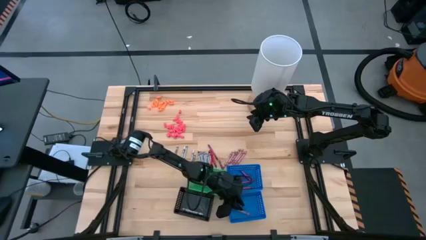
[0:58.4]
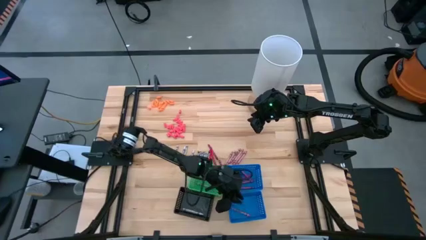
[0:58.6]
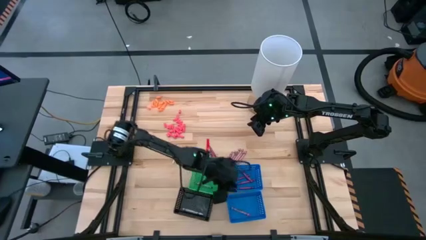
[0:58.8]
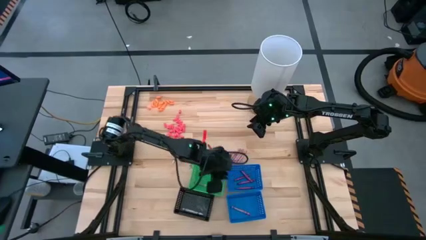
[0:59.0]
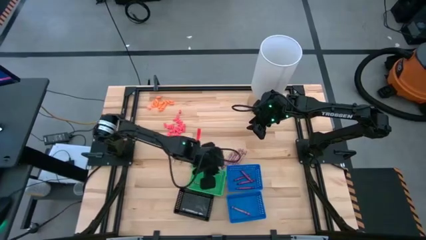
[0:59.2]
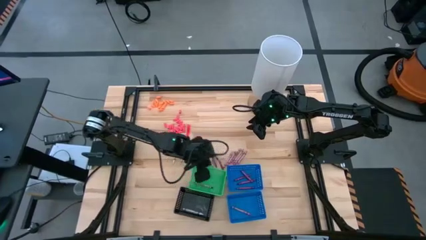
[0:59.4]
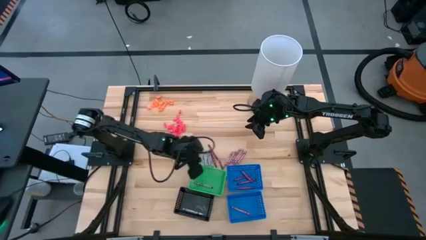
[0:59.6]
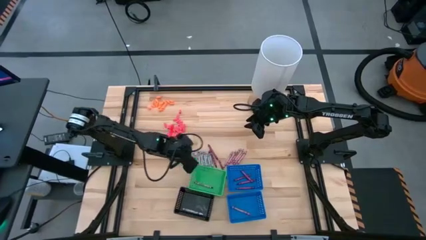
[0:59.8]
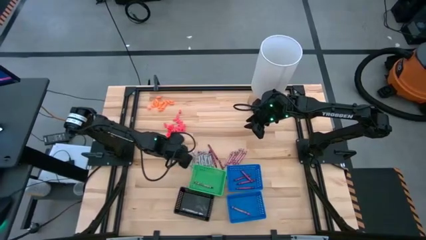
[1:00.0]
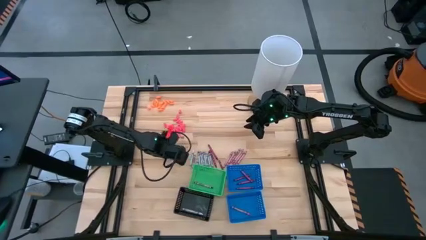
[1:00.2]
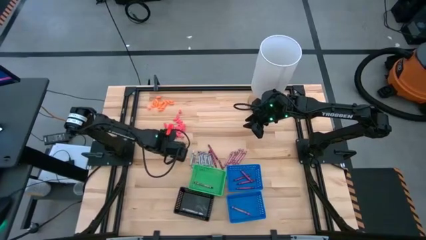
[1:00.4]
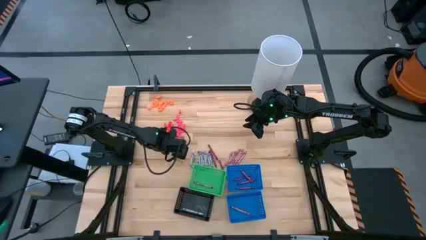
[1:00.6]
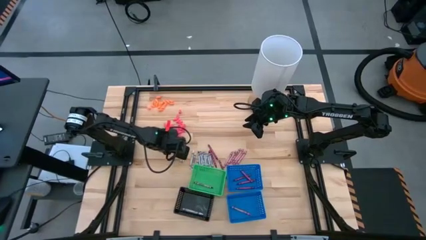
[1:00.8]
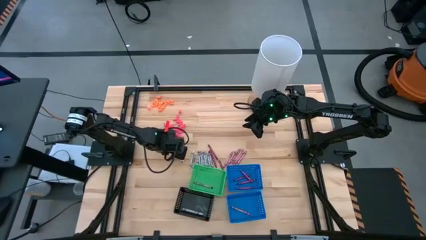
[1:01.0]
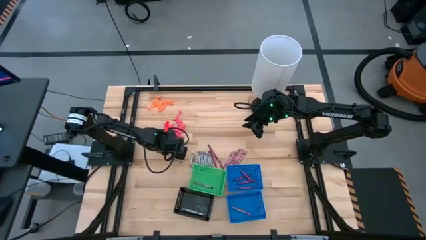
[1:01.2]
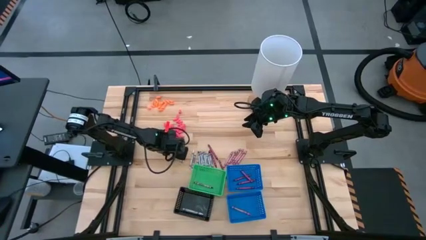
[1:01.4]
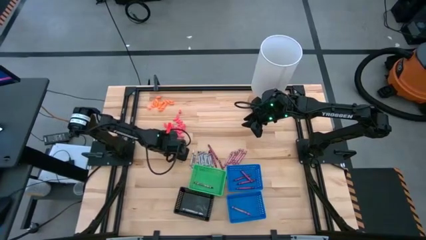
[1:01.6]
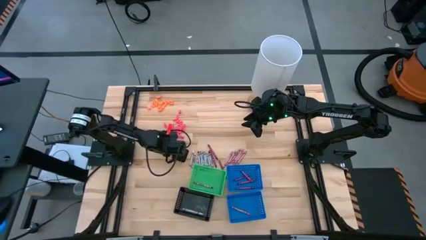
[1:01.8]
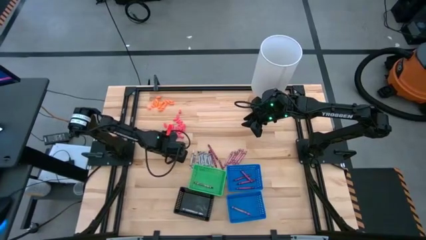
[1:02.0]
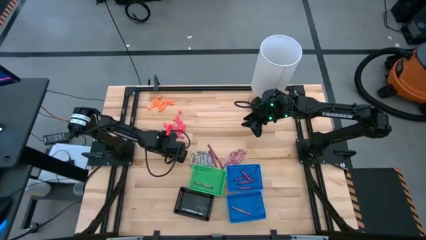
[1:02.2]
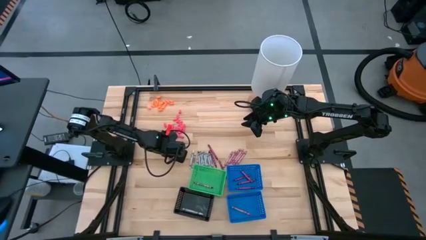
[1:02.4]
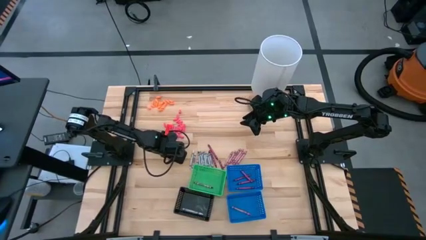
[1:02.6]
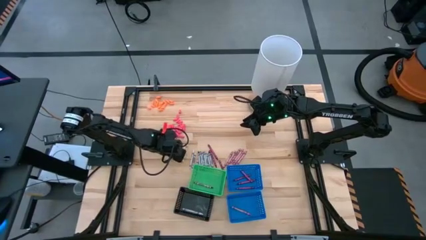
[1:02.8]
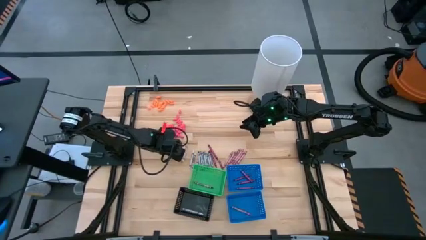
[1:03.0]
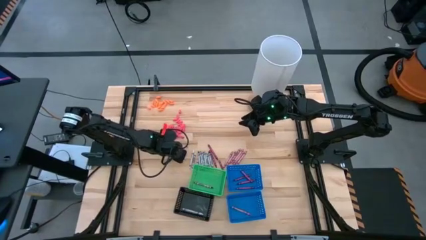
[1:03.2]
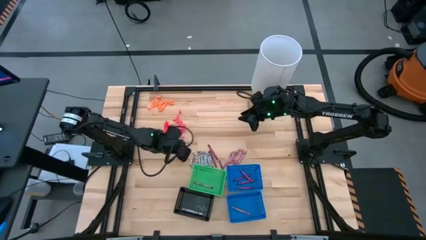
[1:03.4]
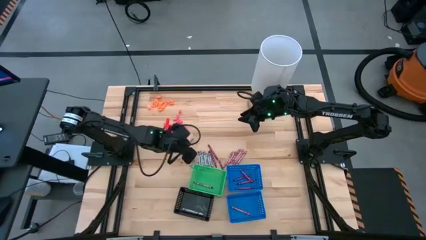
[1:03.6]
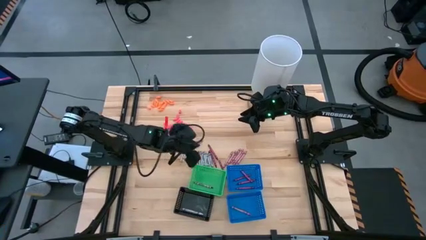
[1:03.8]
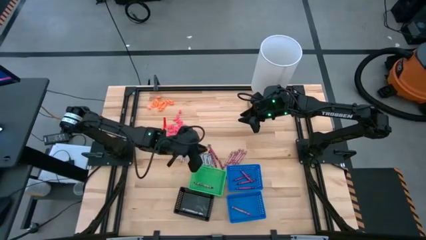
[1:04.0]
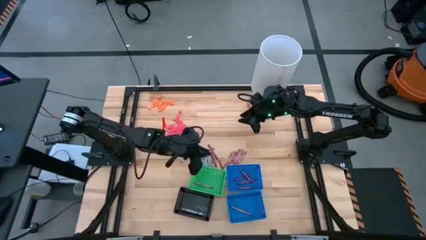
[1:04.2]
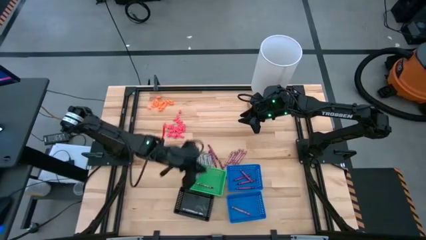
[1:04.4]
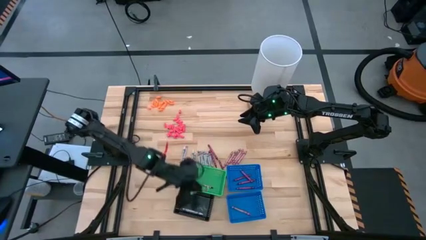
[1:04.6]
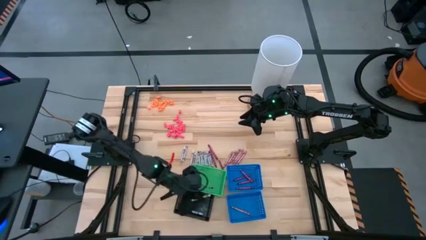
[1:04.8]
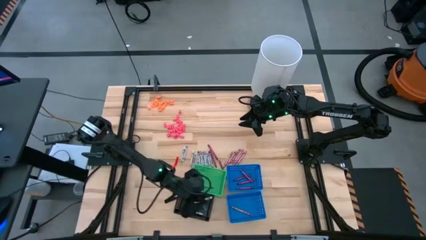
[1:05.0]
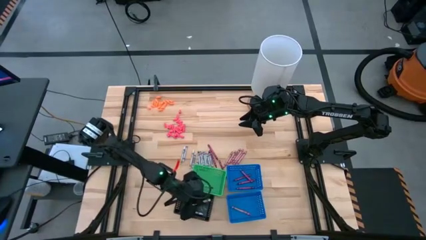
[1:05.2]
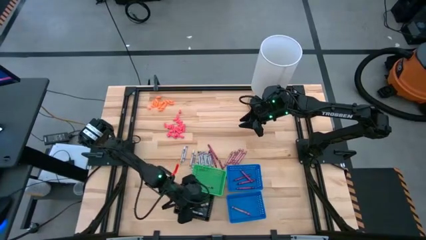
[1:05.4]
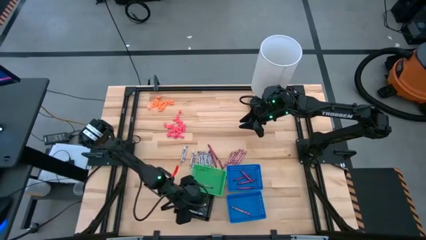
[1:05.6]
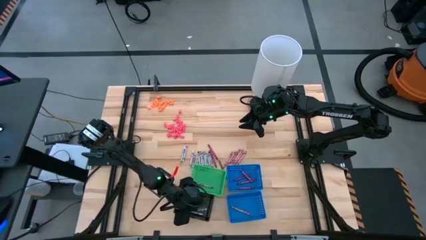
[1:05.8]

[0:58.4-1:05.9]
Task: Sort crayons
Put the white crayon into the black bin

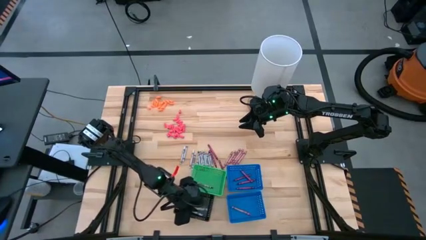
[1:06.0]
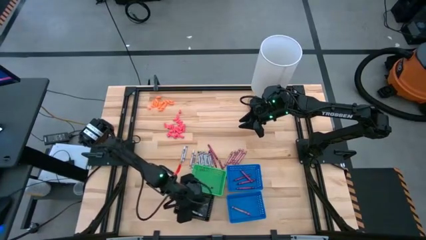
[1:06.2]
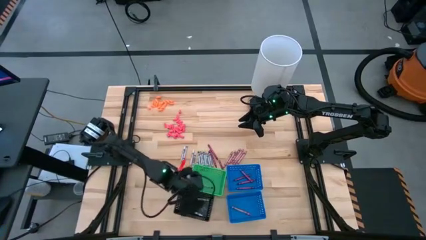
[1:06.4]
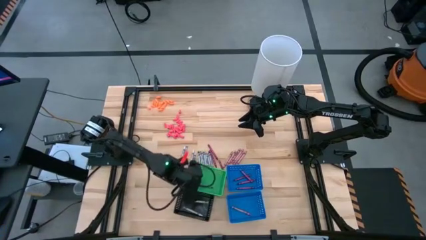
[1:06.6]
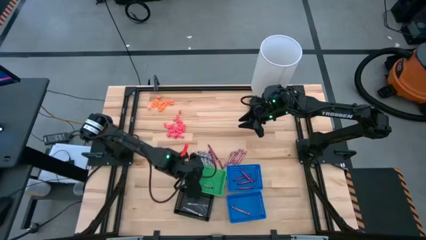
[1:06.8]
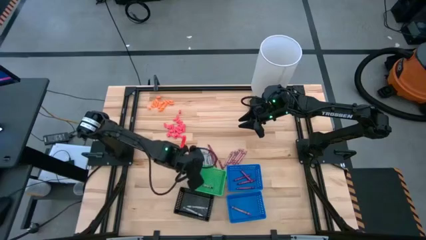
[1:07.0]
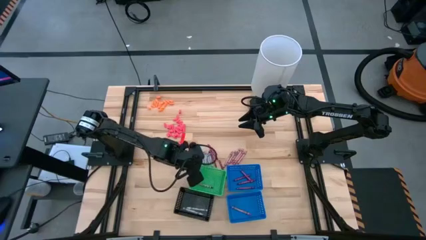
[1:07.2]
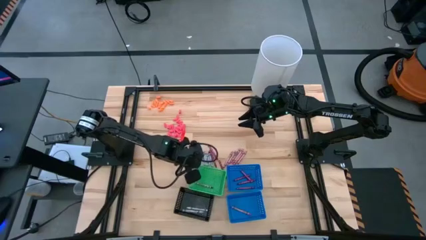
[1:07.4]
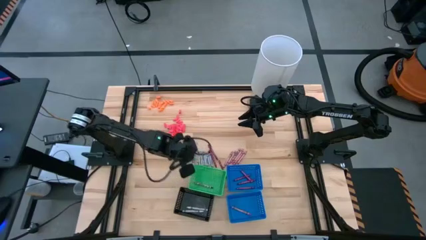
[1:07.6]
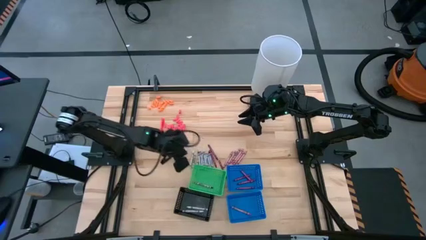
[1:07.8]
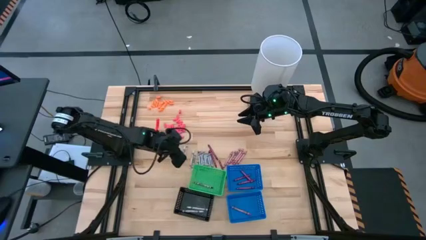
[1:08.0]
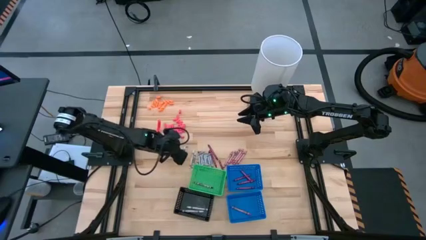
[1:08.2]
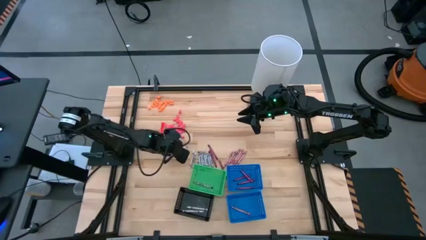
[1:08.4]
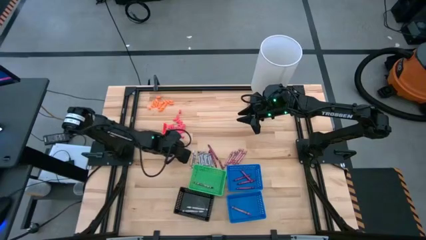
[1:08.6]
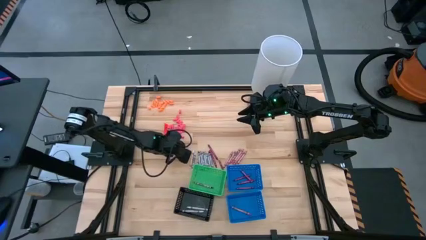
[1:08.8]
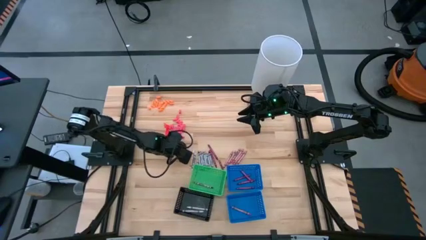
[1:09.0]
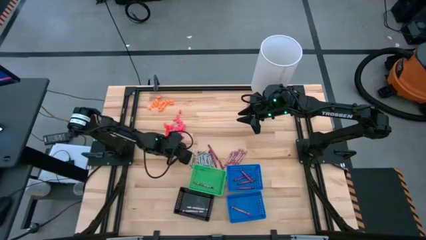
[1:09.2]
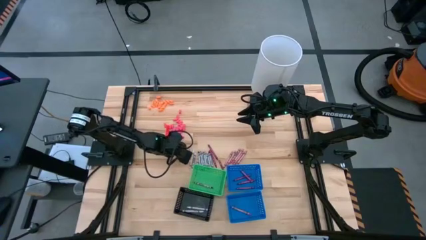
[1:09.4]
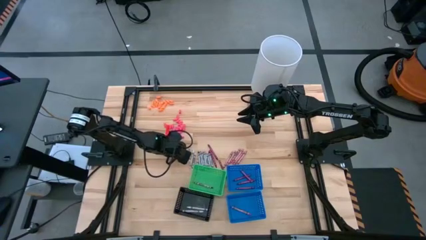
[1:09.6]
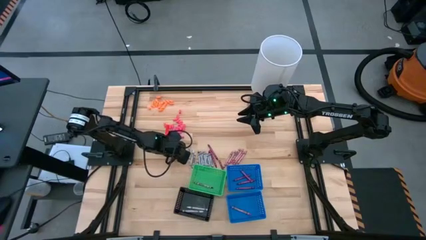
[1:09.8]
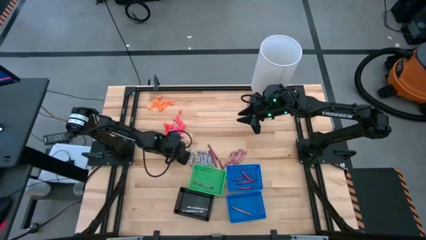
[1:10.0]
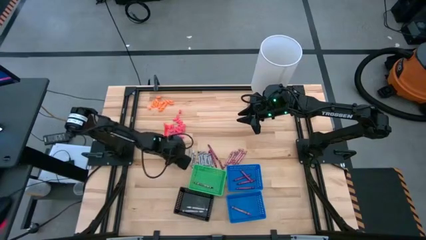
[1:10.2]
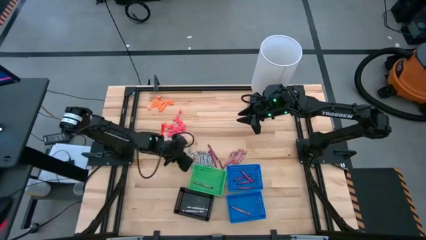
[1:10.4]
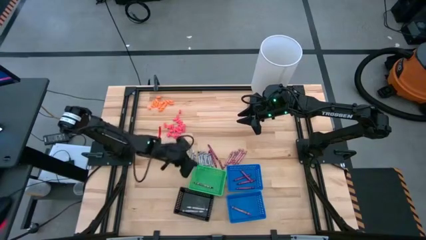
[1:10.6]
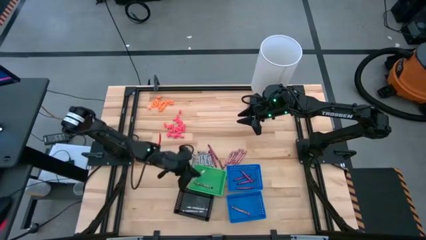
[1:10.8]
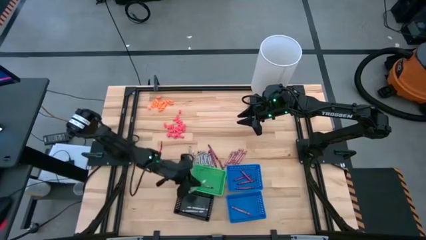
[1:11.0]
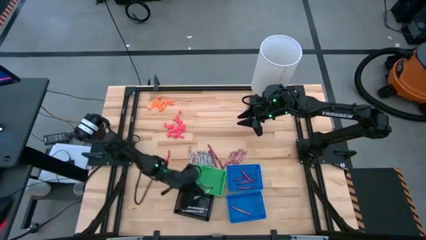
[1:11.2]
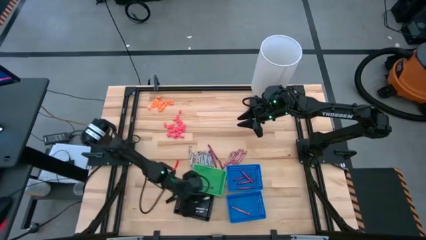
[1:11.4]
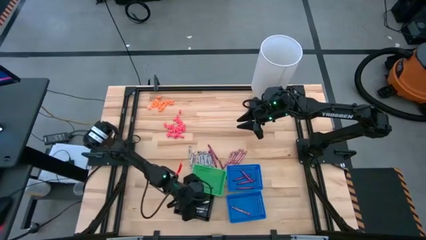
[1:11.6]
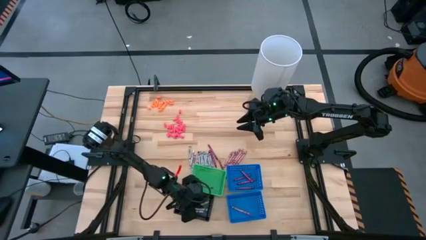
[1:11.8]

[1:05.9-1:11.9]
Put the white crayon into the black bin

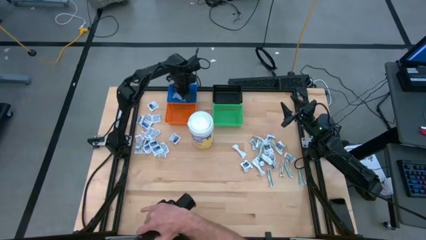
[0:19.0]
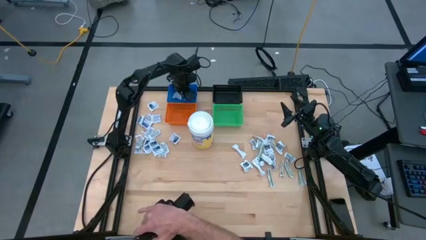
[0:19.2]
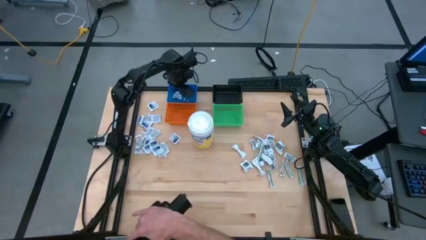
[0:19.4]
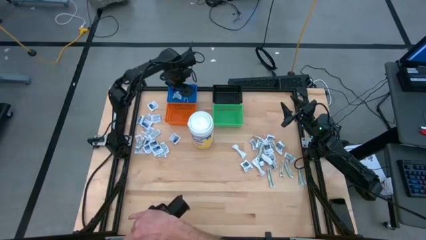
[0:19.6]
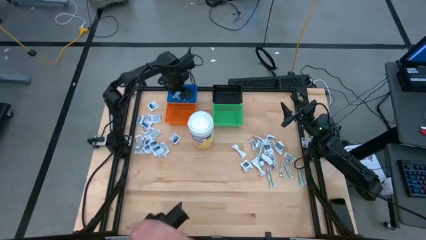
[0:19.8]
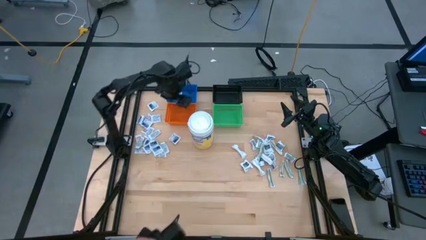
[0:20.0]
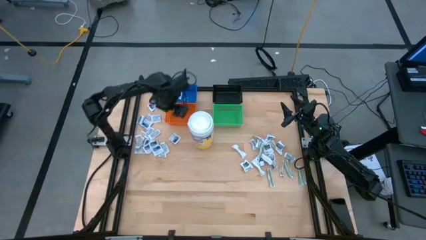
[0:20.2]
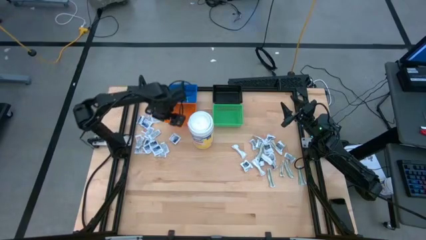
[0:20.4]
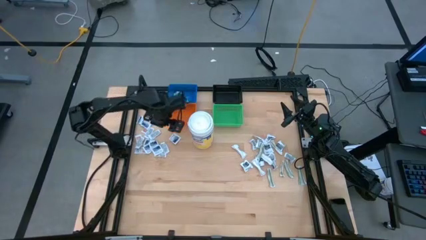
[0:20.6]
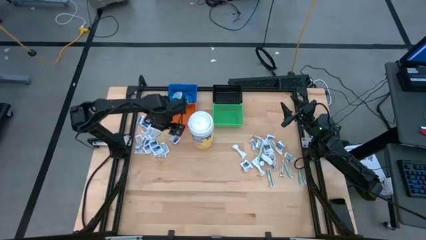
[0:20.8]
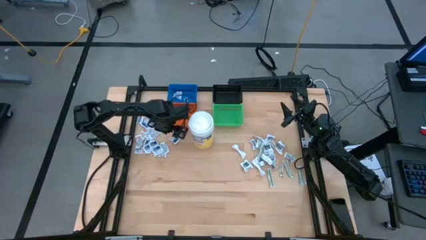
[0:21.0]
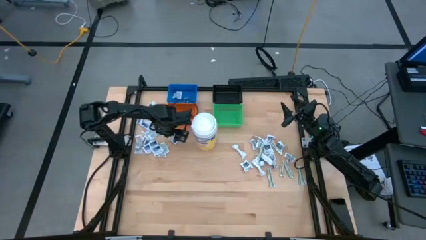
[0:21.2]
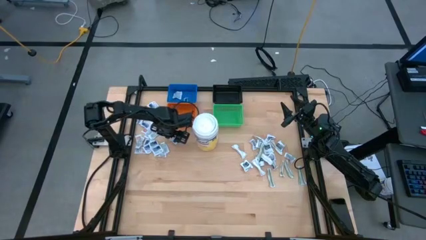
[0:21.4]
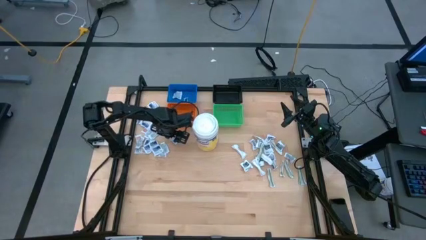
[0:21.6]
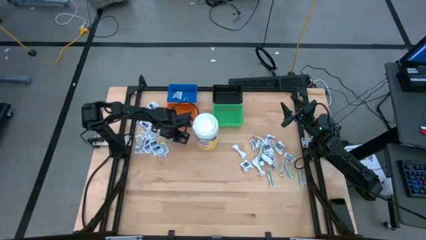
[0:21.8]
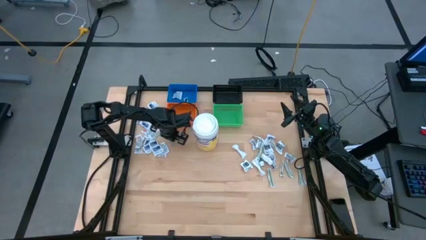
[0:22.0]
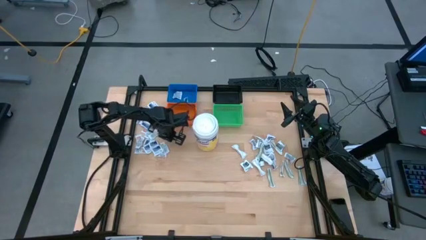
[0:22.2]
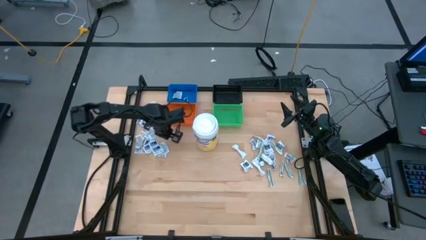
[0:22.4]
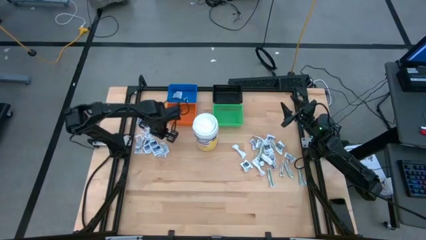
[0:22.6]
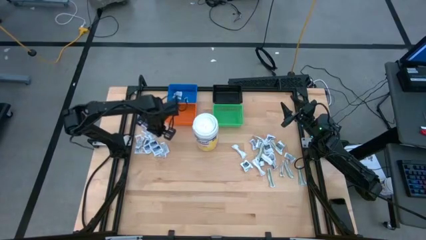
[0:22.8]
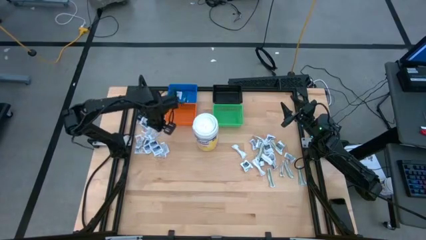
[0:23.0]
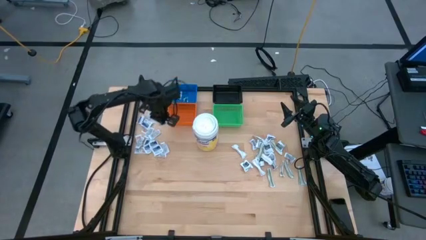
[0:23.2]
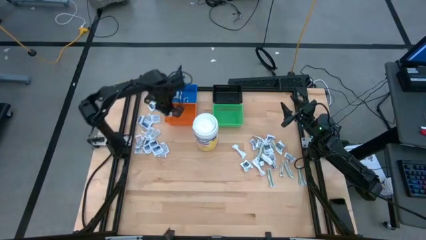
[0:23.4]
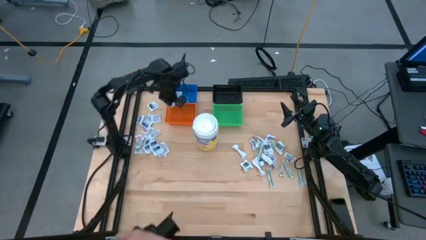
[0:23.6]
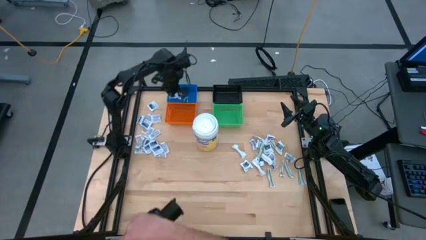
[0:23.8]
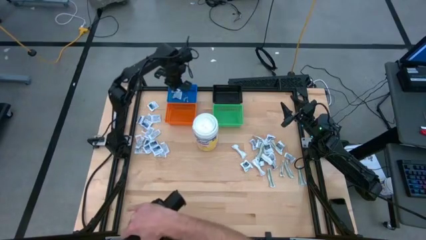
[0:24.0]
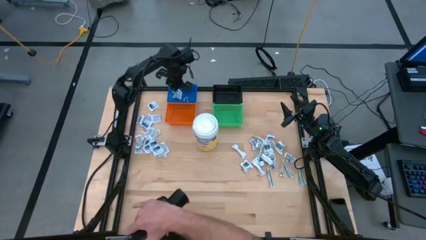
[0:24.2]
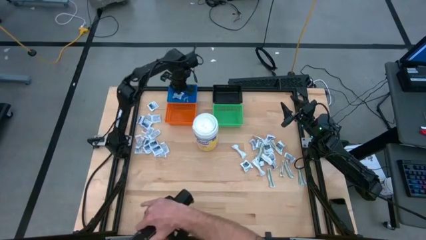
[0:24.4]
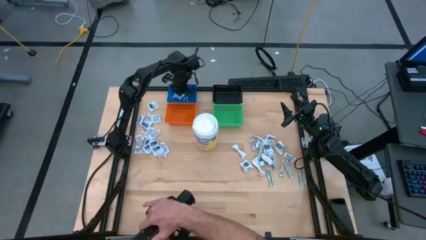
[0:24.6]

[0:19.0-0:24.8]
Task: Pick & Place First Aid Supplies
Put the blue alcohol pad into the blue bin
